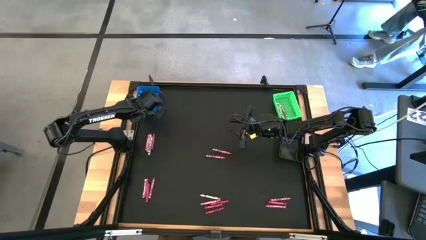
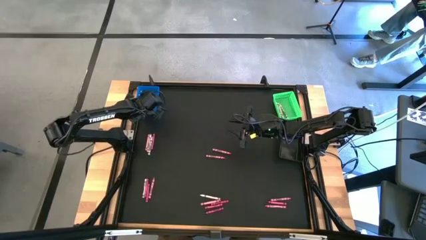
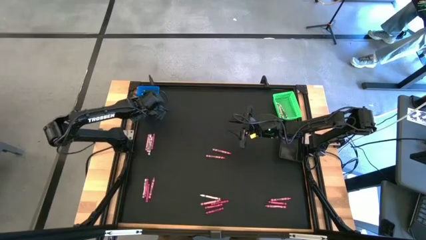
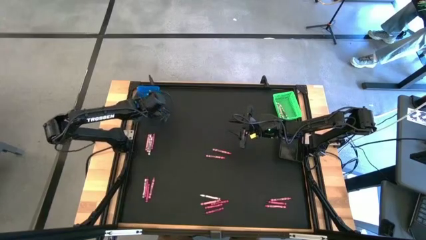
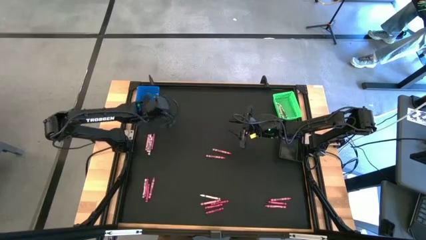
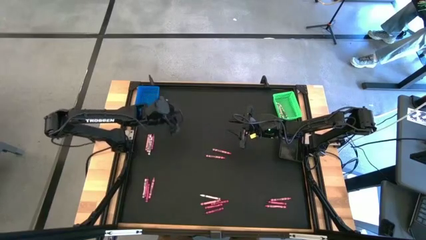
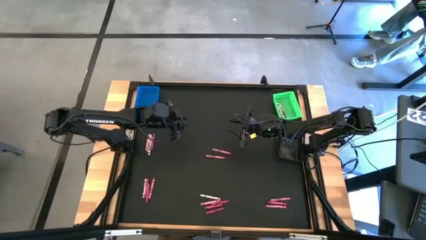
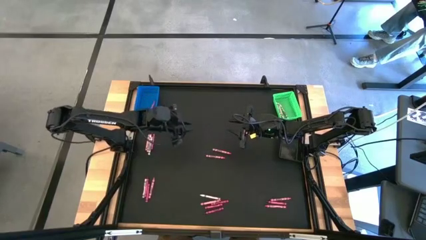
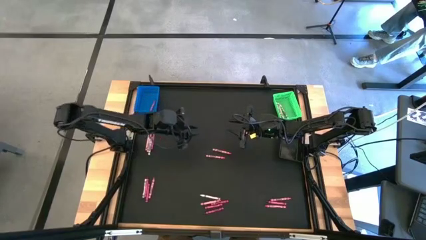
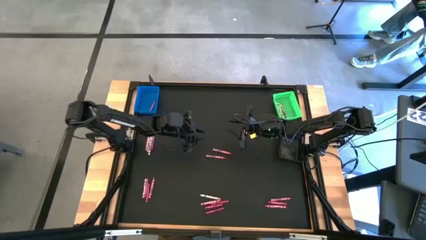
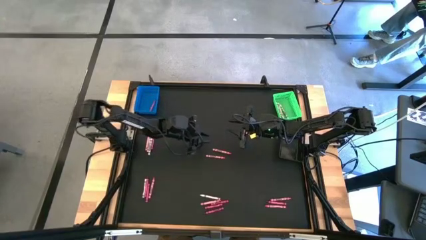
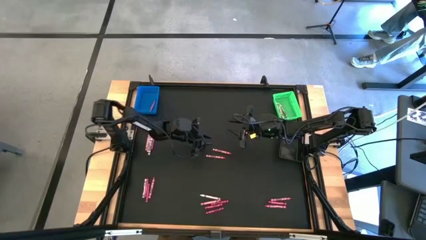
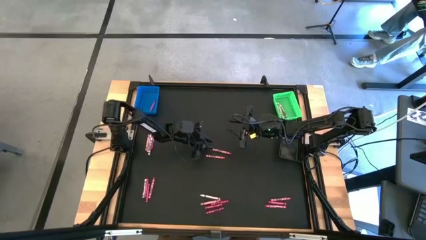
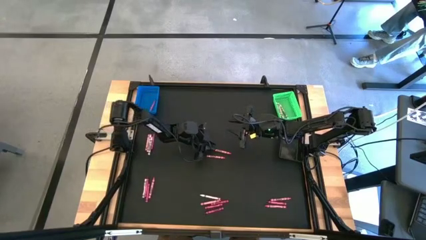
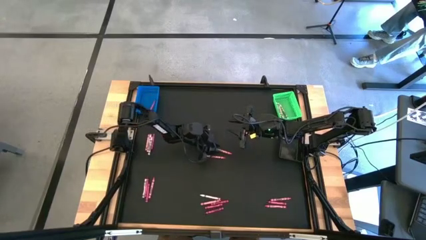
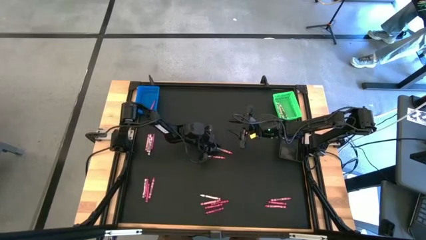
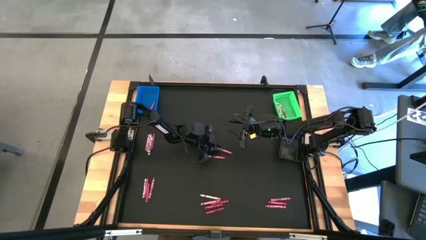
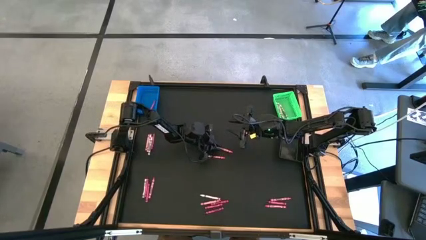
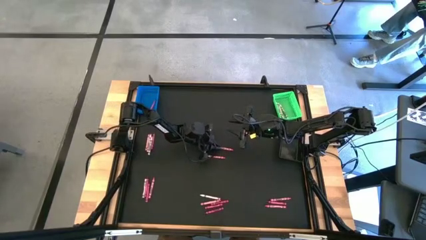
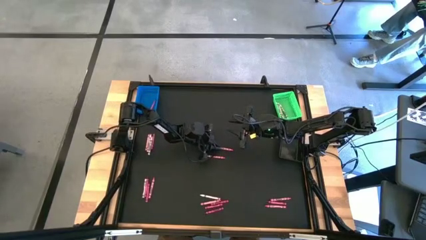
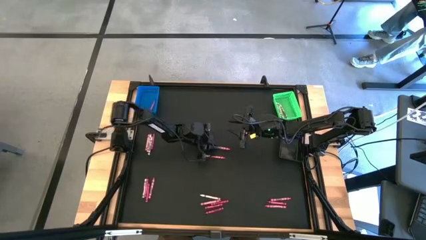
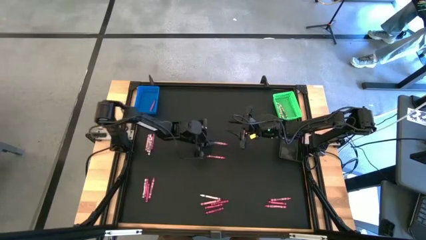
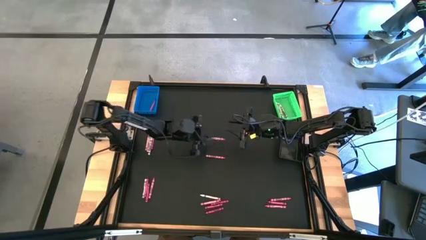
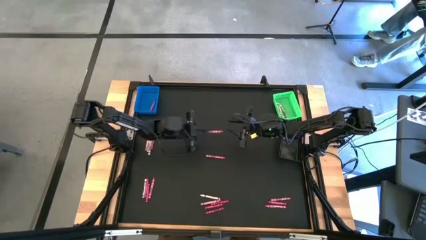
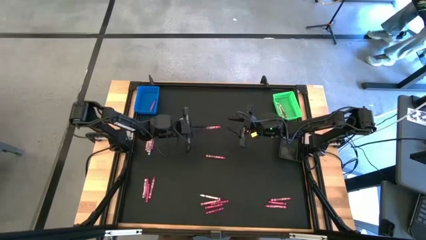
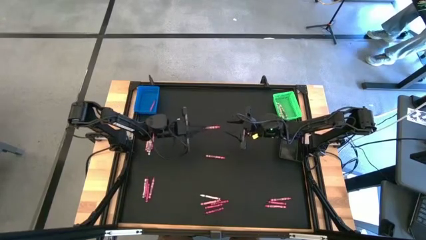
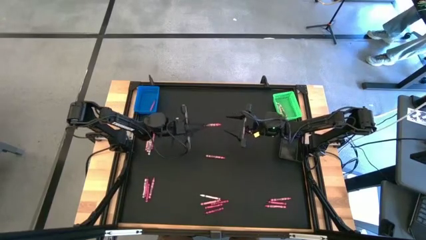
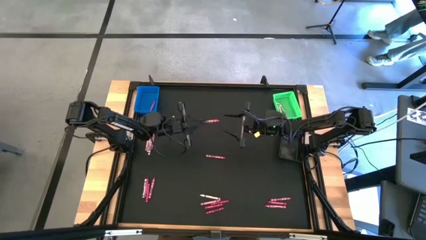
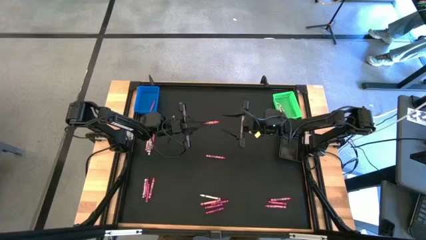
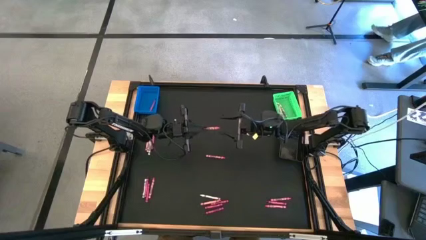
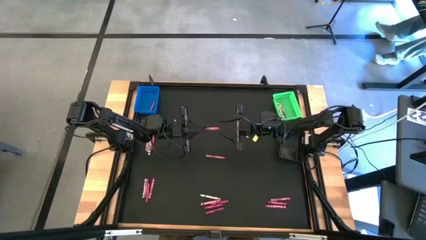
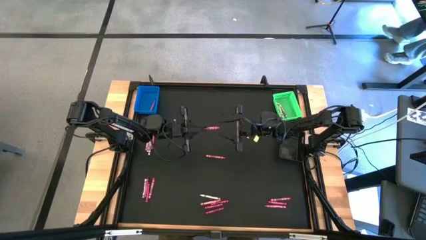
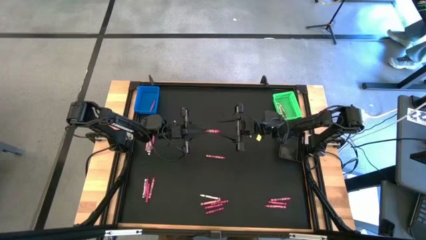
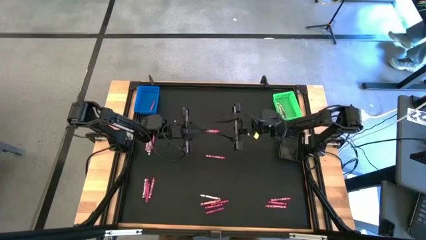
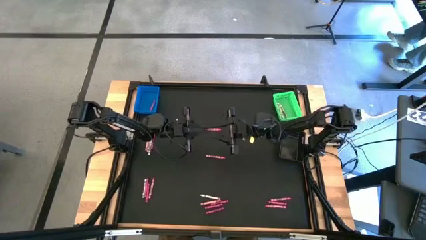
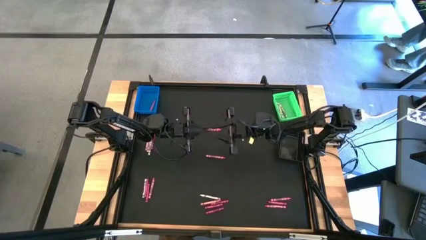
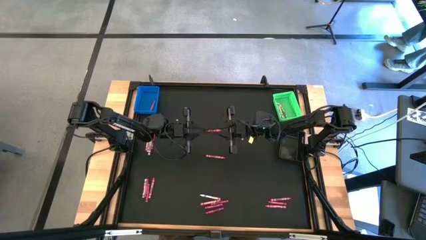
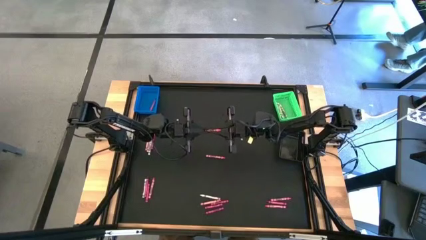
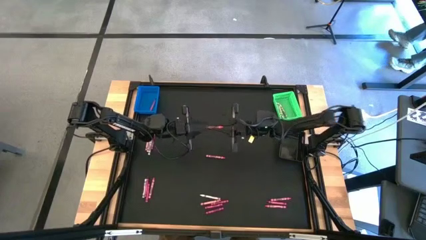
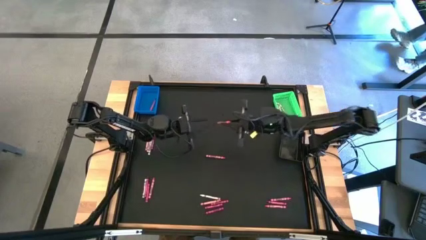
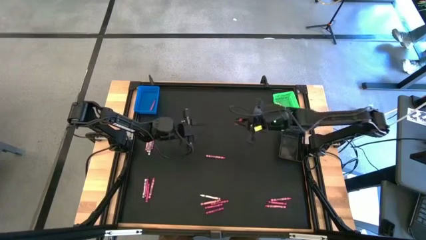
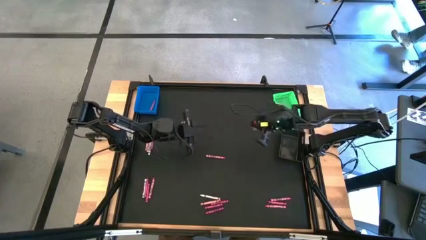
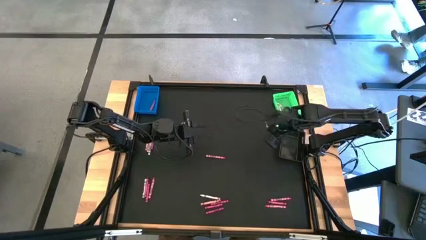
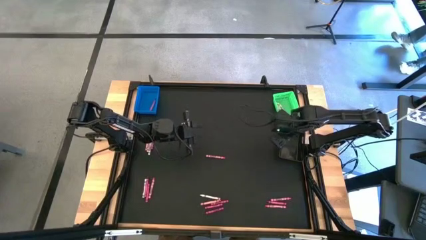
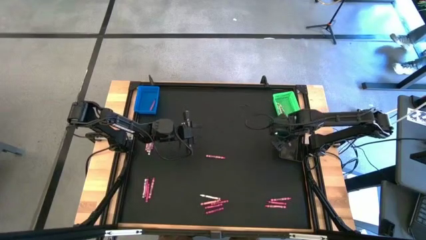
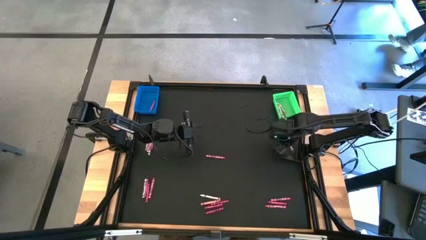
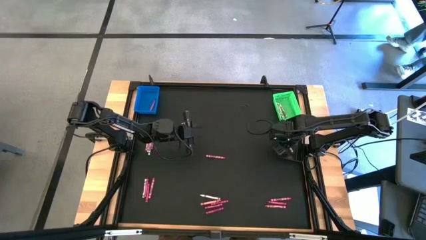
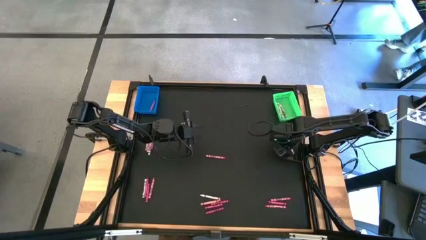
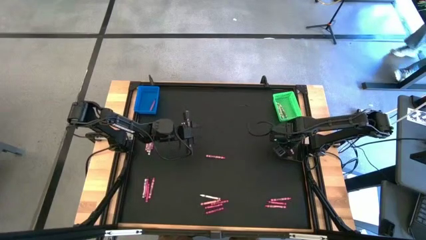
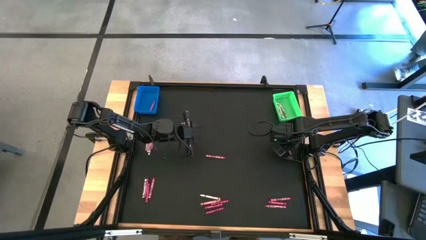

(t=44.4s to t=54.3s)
Task: Sort crayons
Put the pink crayon into the black bin

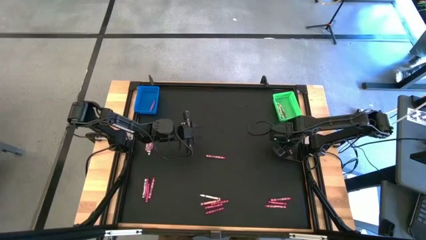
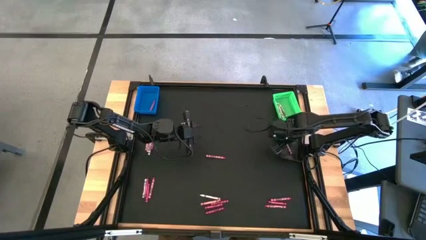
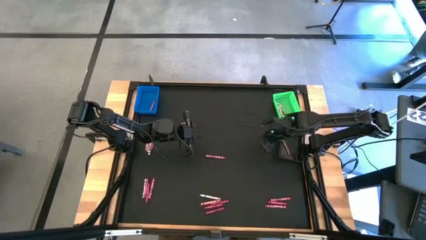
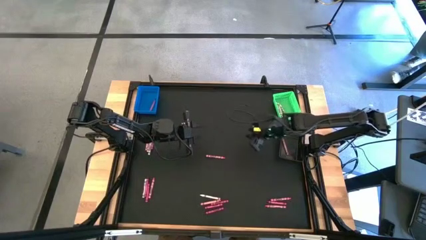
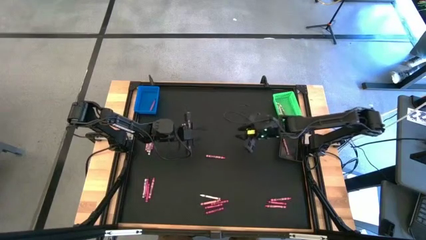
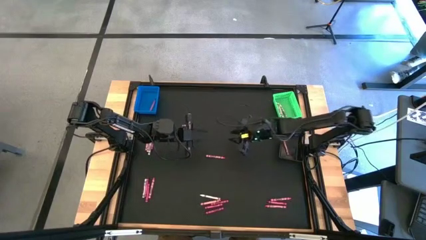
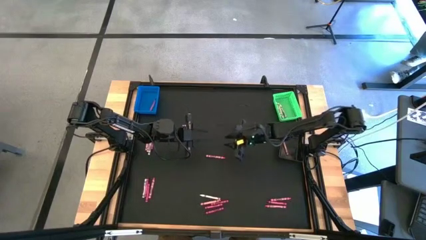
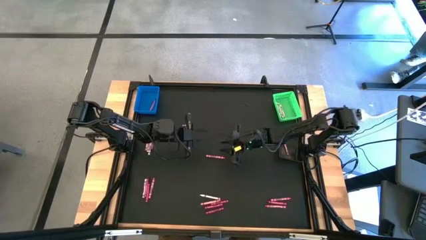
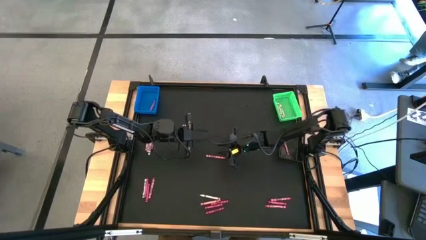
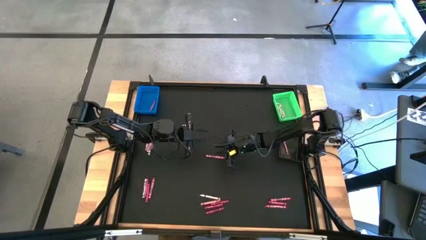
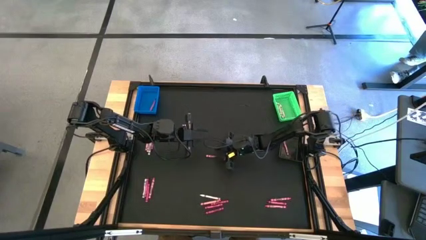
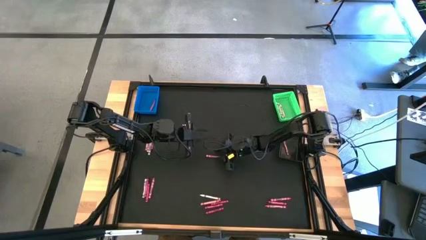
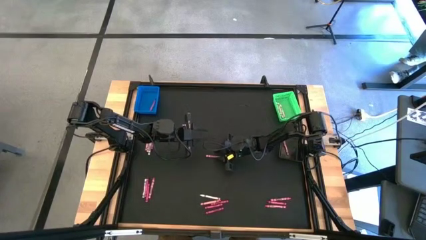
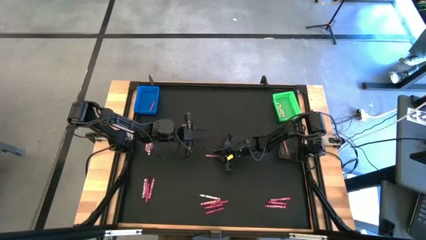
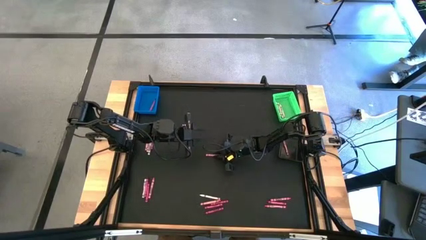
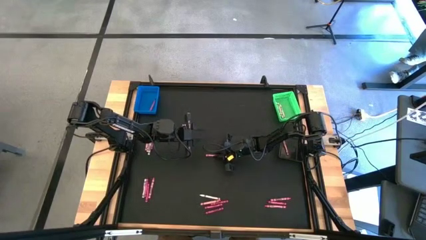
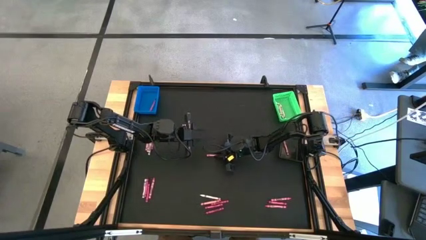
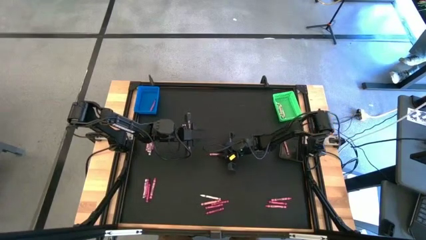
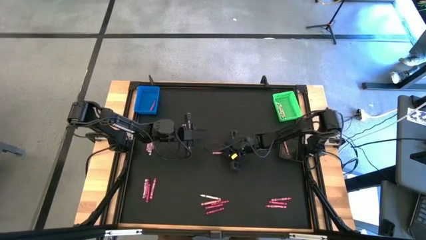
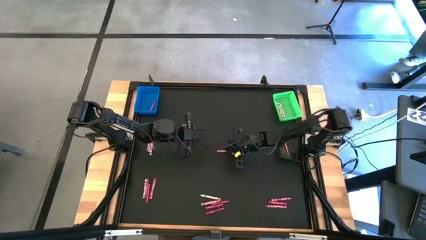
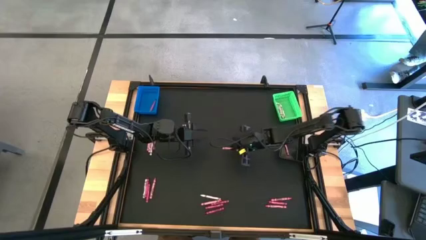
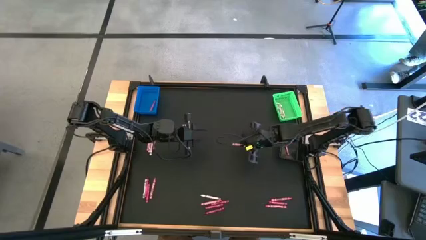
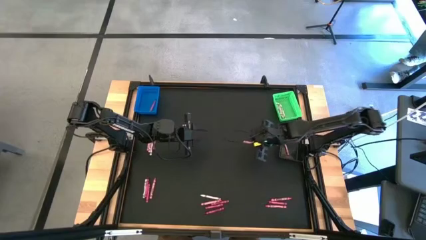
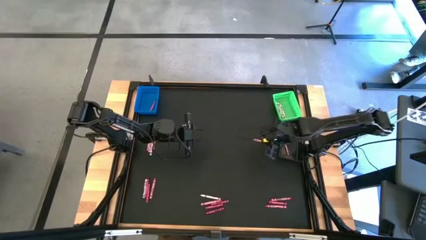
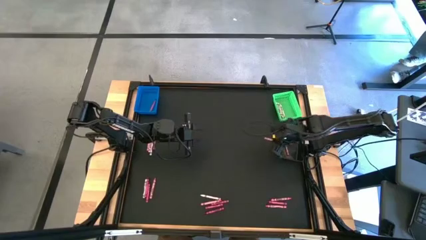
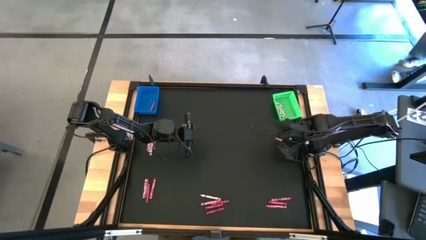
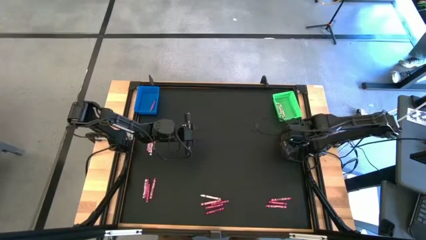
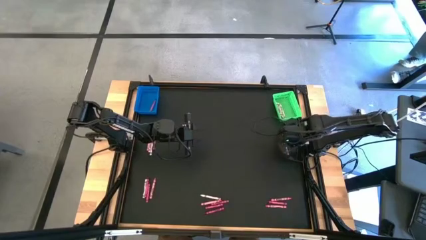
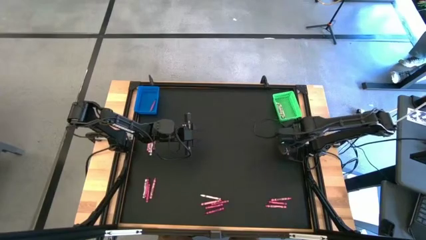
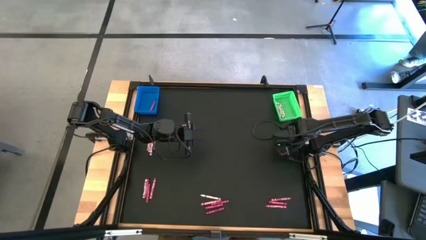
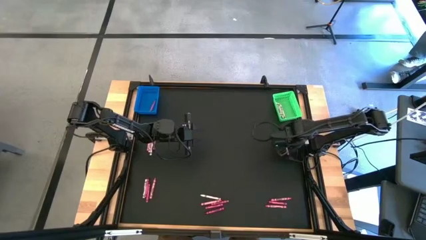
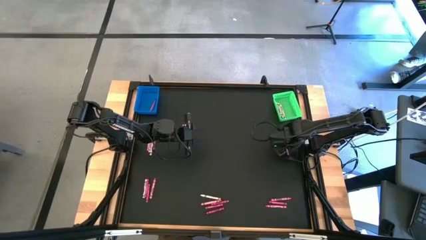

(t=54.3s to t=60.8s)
Put the pink crayon into the black bin

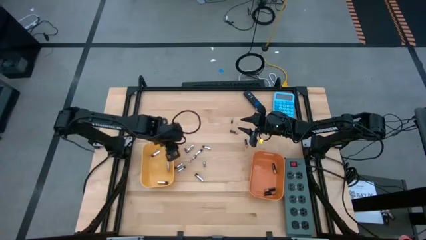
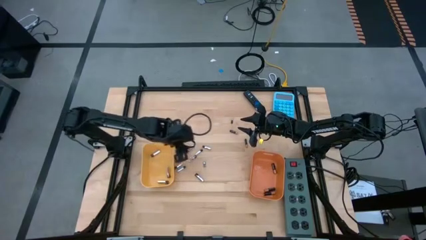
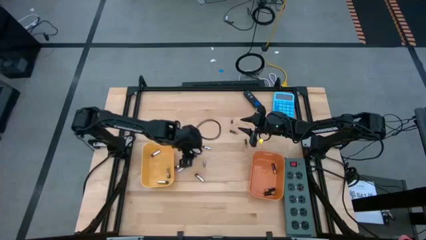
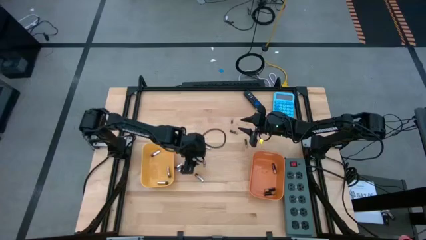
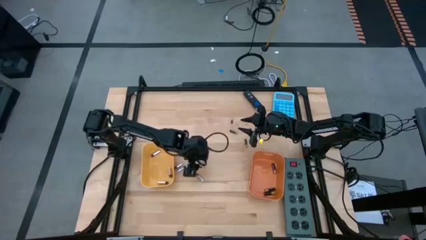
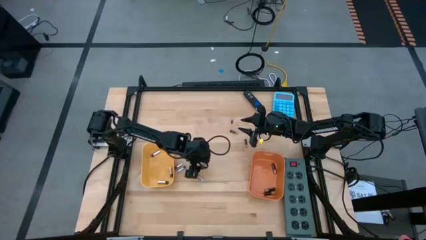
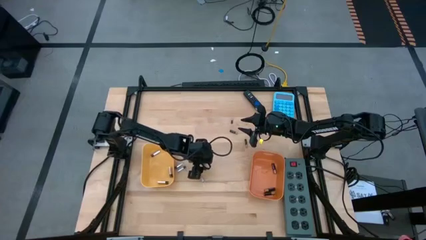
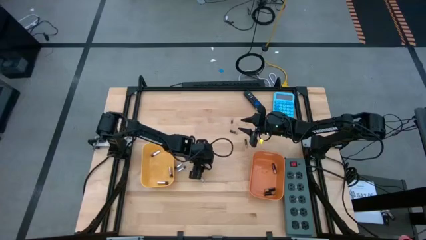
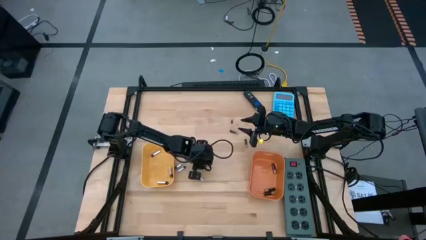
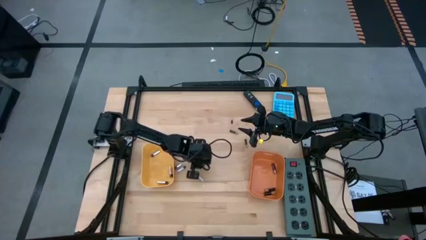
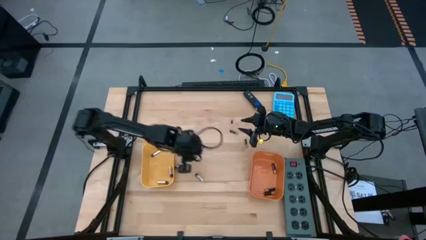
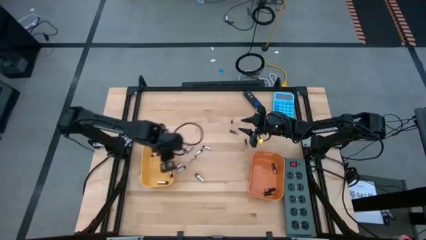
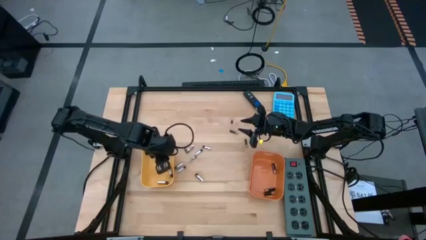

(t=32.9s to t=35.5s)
Task: Sort batteries
Put the silver battery into the yellow bin
